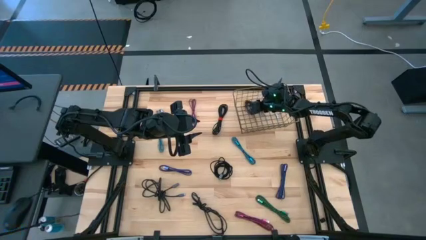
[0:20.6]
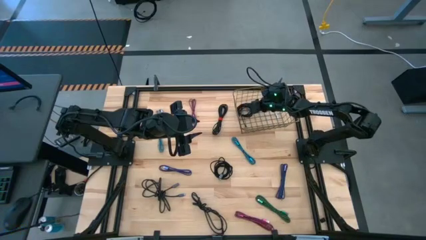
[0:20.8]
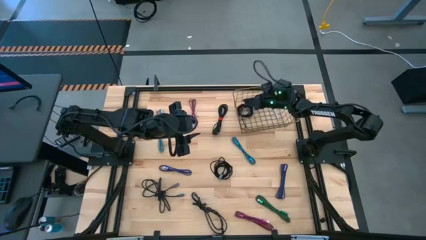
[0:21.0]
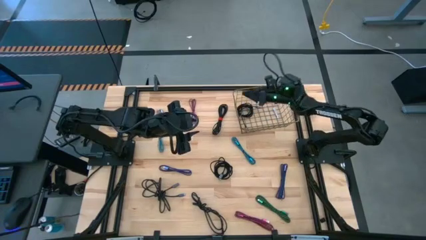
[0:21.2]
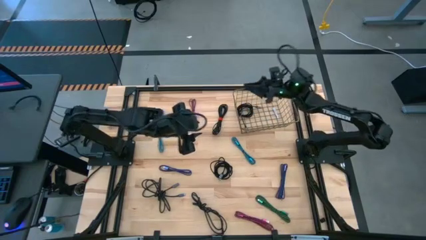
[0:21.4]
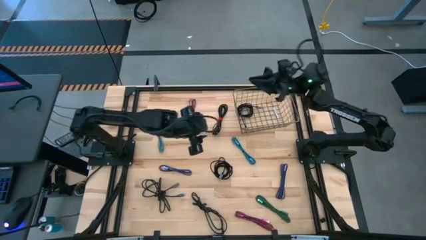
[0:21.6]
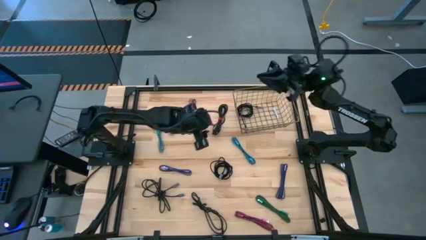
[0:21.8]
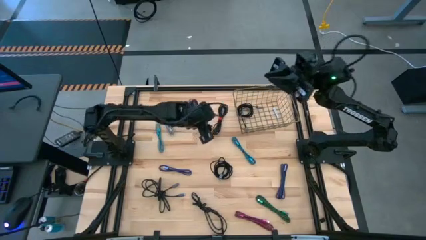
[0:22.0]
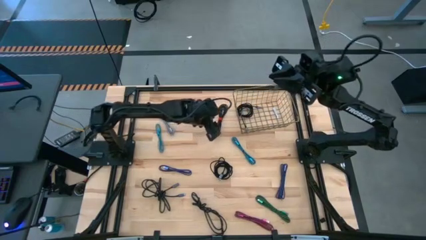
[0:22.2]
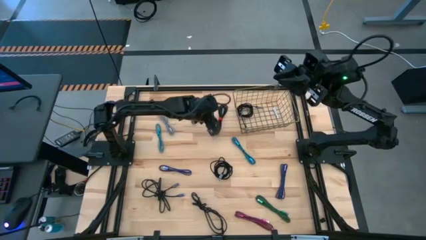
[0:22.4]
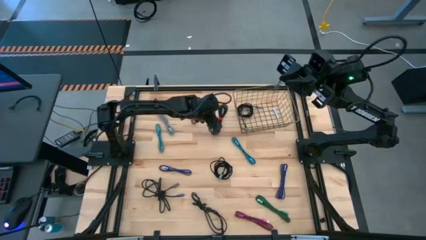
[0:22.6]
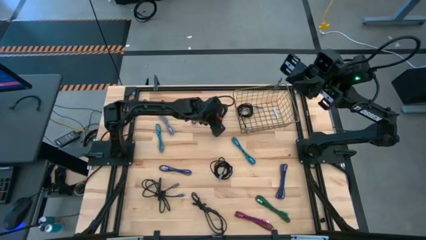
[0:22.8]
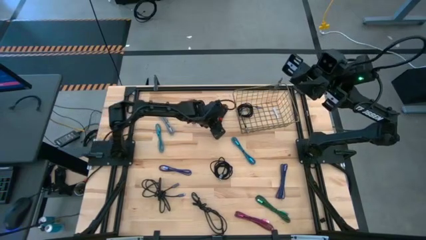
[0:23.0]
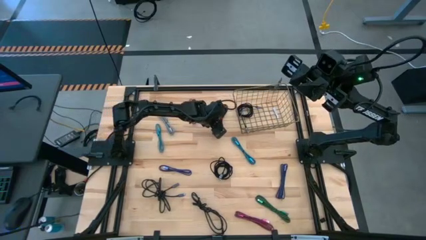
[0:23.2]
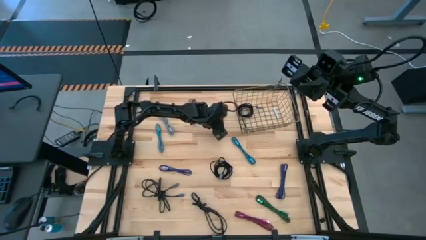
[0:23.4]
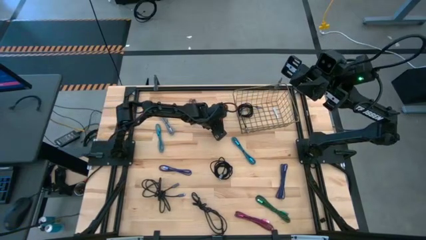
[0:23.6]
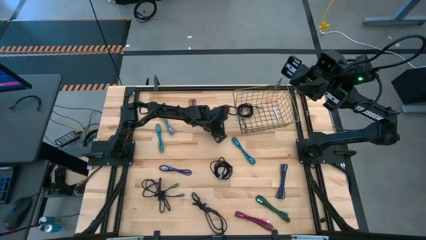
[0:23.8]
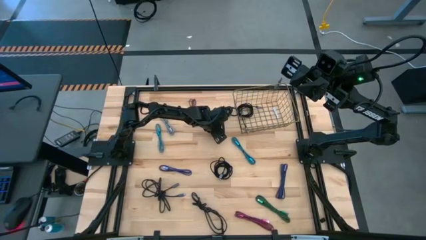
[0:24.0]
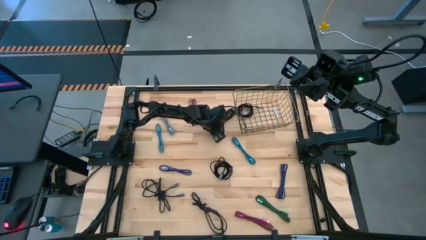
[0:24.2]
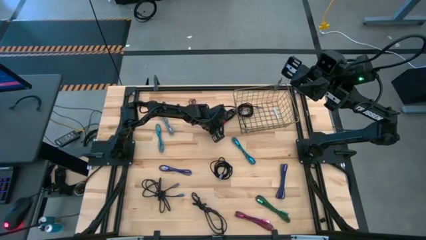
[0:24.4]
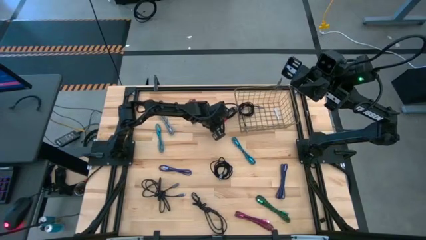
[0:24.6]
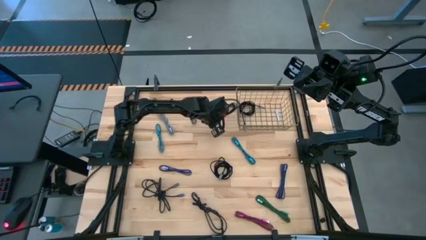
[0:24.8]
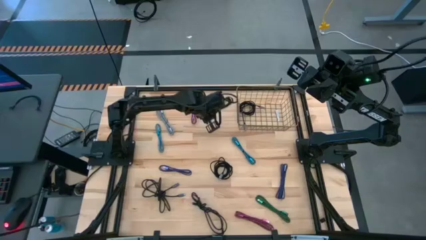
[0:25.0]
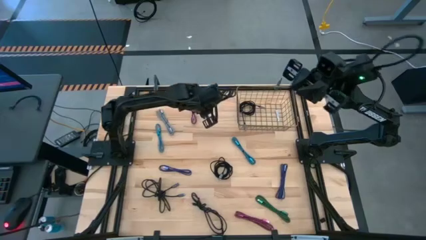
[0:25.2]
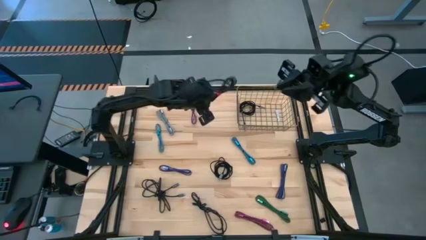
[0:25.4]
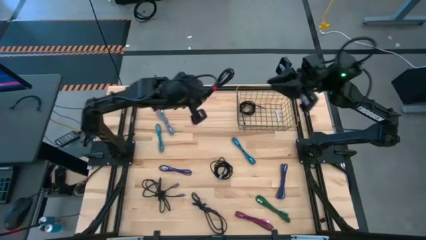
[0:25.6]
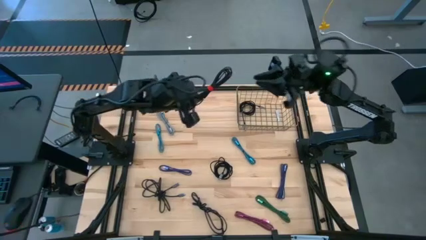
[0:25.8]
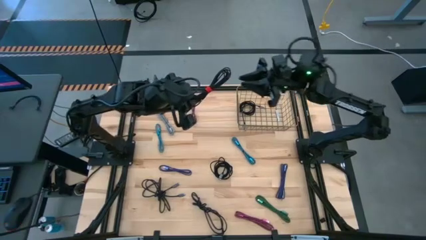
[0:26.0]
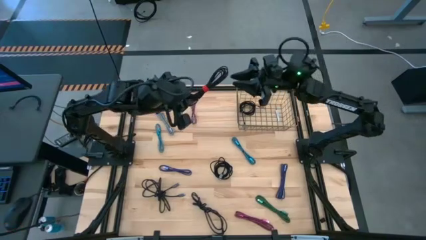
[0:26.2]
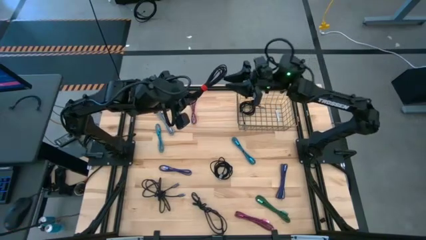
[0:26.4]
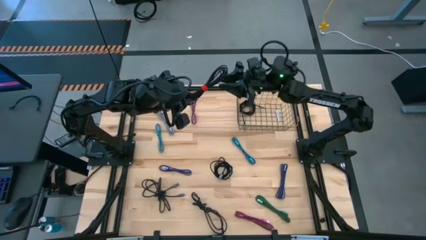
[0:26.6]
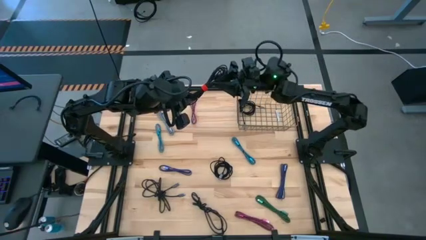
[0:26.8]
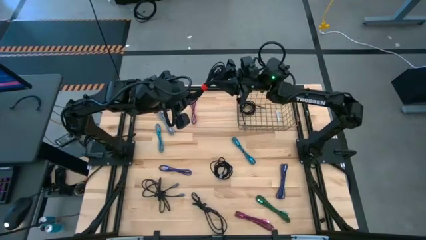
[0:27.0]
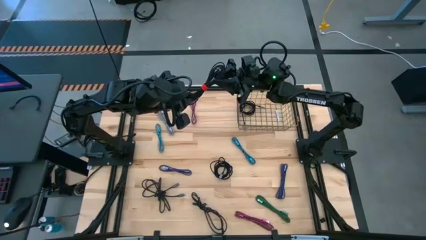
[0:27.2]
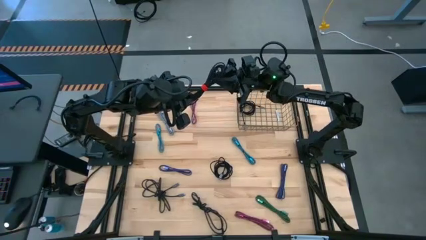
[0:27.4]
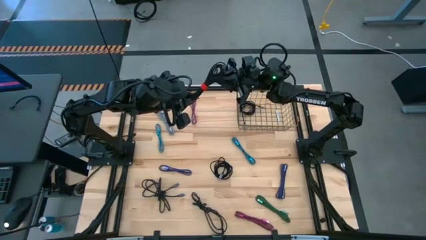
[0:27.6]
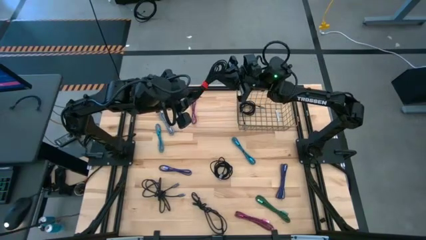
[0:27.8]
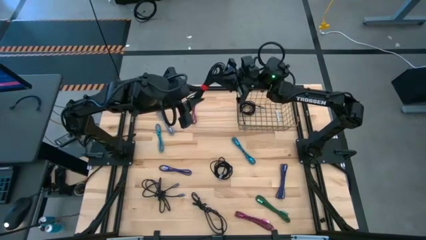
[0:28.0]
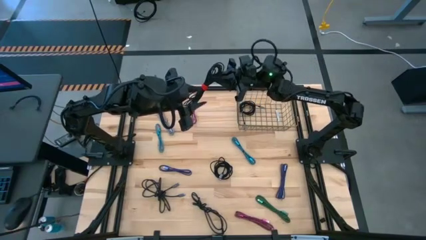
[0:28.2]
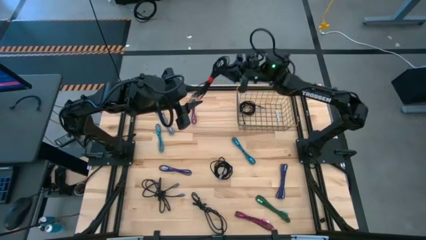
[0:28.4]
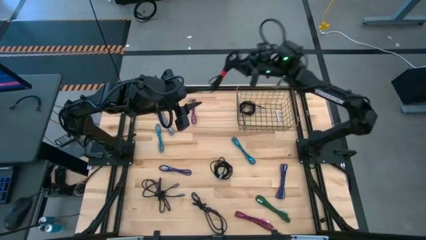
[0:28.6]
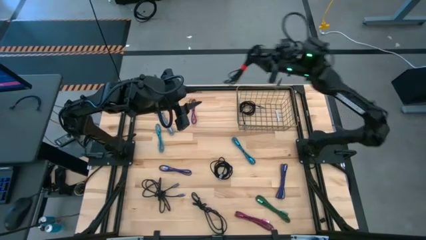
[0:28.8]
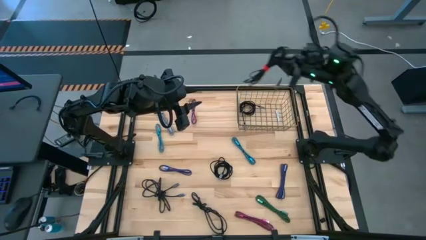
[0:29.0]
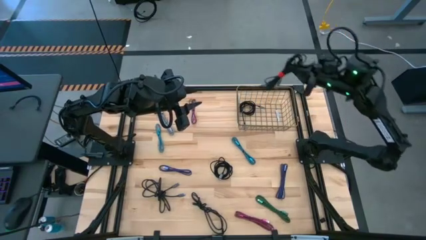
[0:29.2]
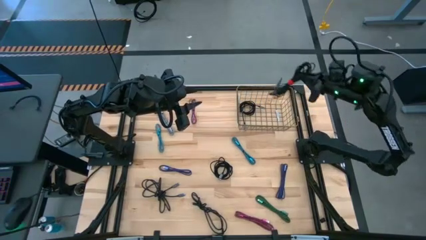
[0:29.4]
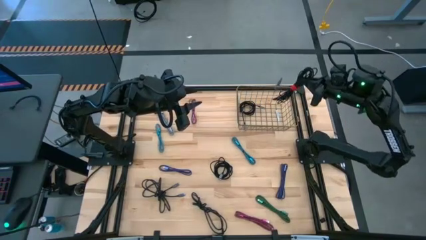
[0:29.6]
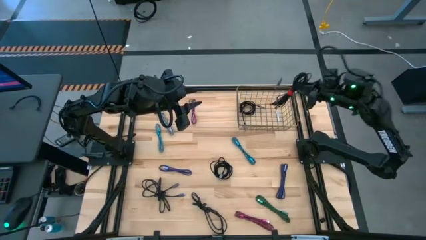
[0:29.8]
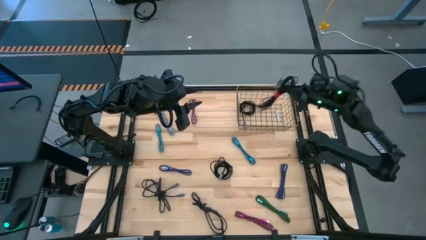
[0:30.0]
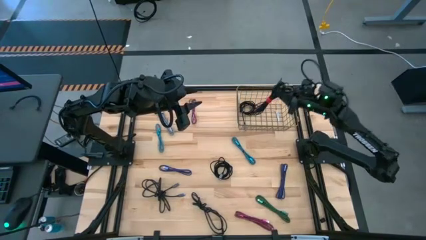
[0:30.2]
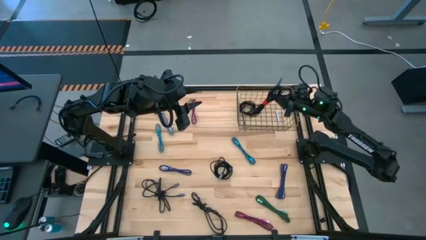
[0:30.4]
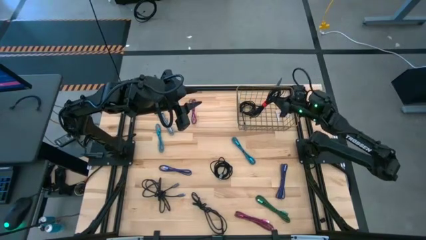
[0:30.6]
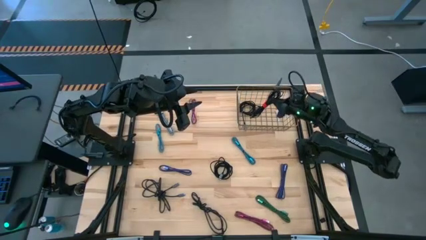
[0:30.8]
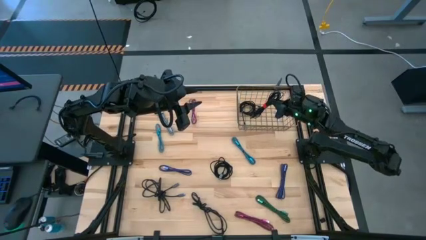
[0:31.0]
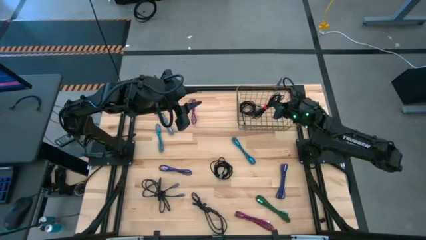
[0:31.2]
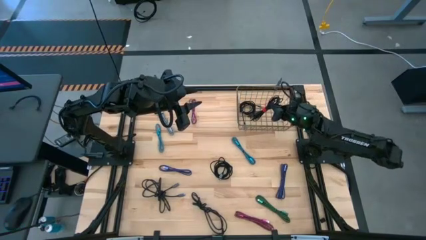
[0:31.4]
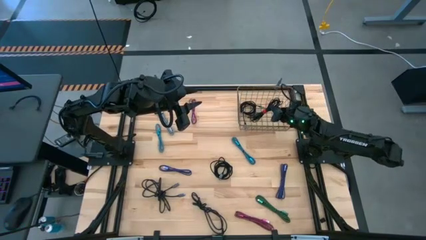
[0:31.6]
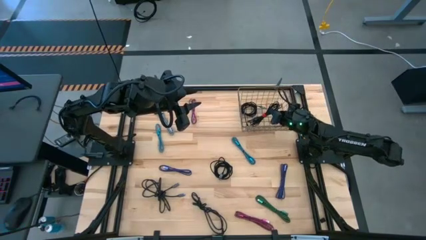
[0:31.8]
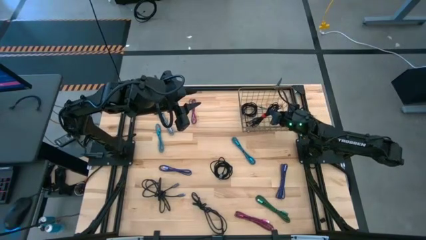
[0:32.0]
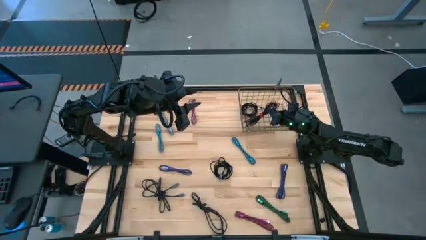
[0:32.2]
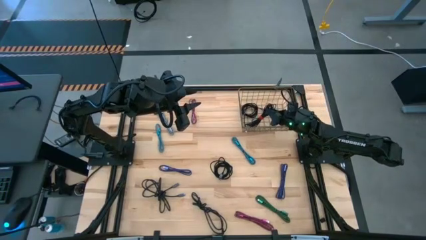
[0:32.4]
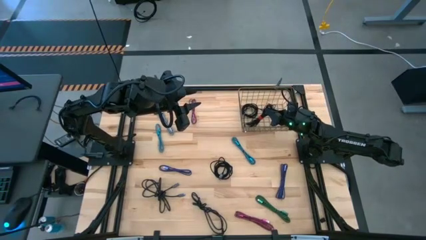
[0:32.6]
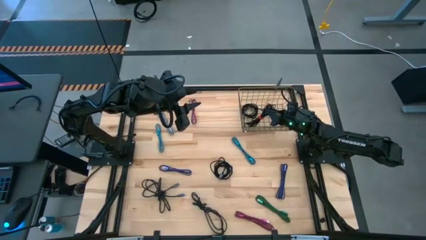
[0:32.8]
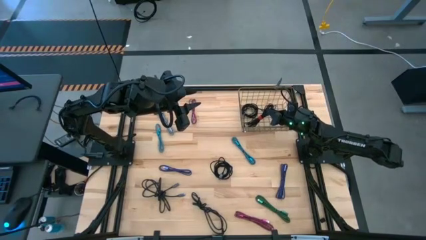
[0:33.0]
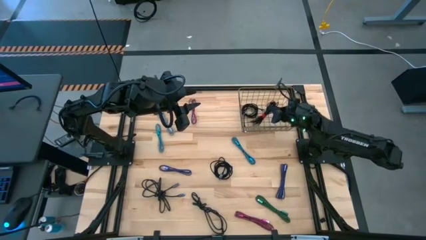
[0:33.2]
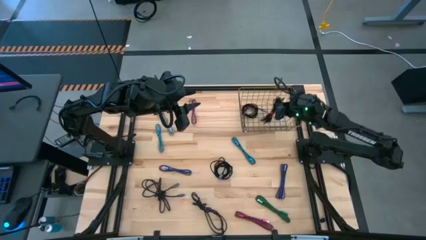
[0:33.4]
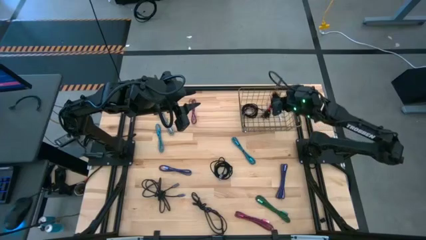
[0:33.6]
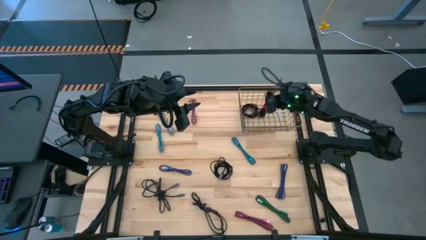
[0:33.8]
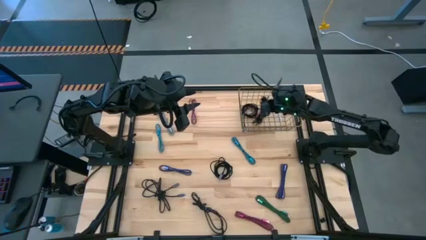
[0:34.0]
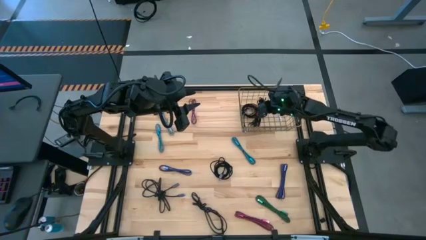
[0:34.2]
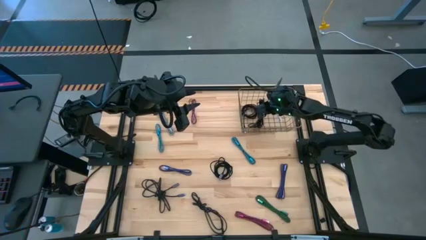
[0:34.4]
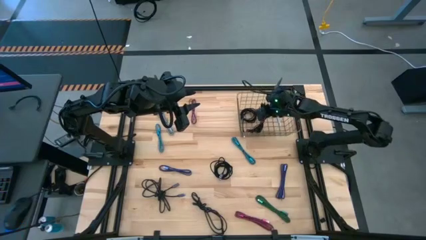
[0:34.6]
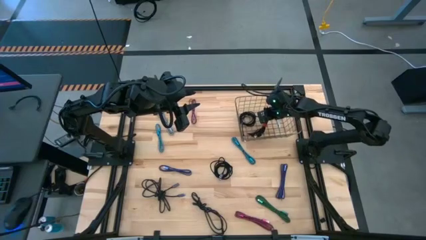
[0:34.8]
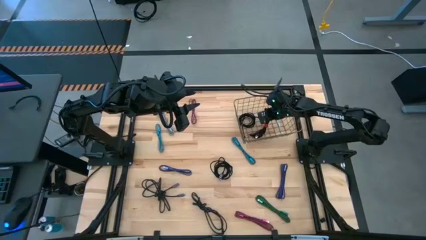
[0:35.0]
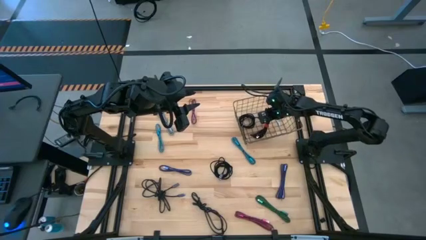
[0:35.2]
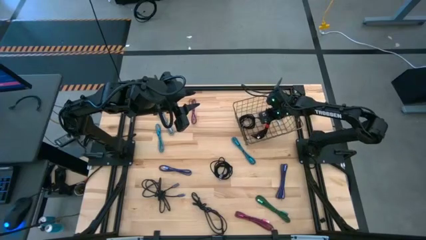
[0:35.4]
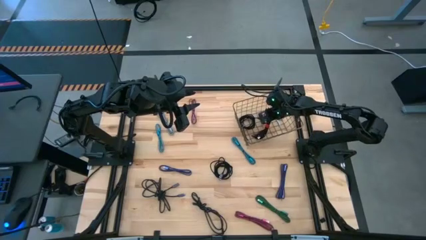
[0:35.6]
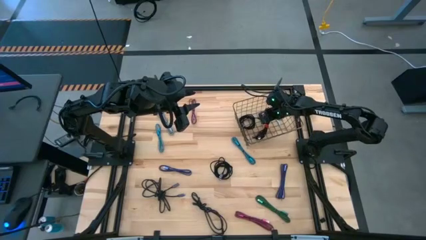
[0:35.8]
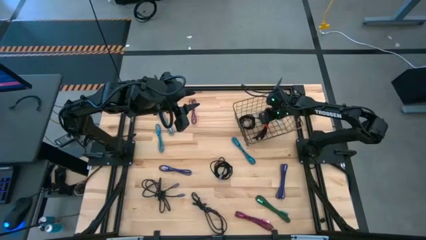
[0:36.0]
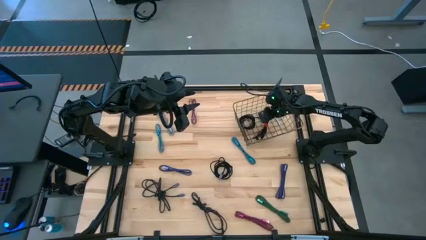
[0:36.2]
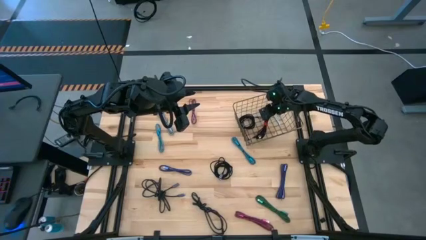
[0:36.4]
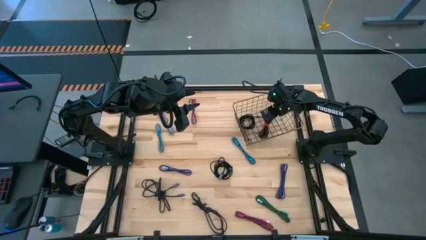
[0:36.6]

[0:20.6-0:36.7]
Task: Pick and place USB-C Cables
Put the black charger cable into the wire basket
